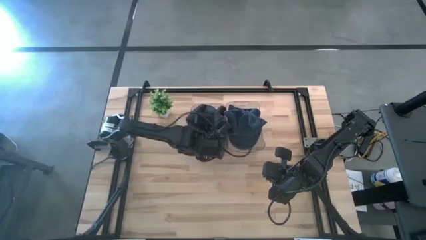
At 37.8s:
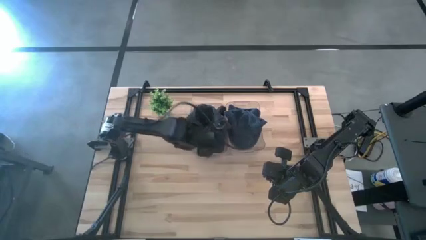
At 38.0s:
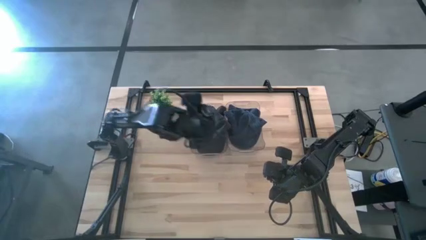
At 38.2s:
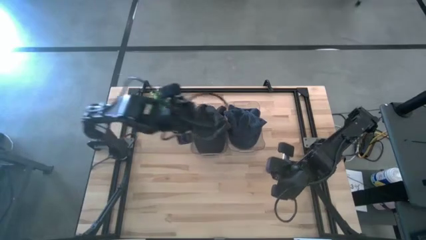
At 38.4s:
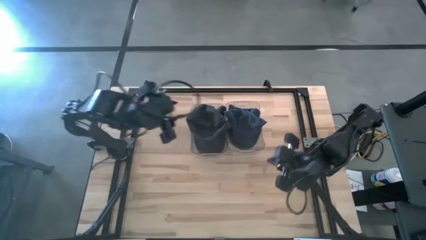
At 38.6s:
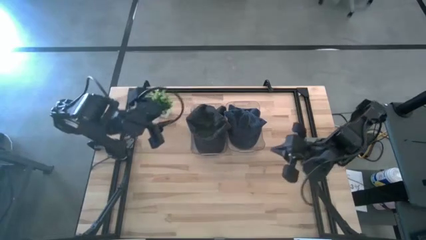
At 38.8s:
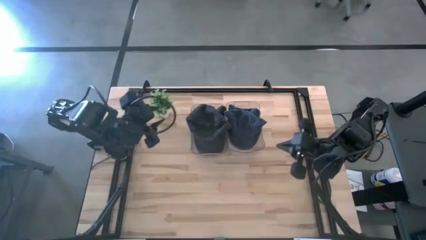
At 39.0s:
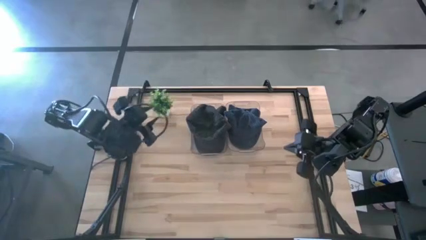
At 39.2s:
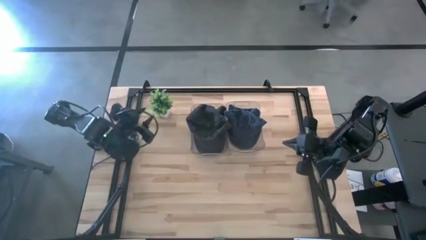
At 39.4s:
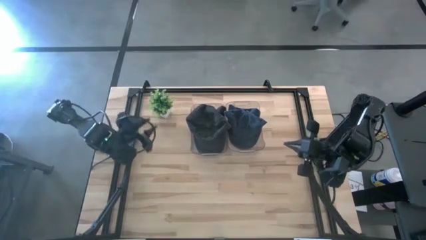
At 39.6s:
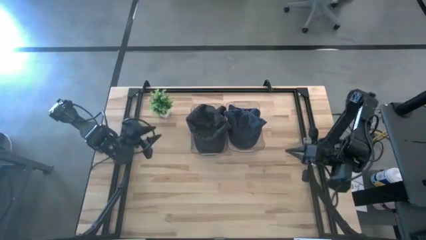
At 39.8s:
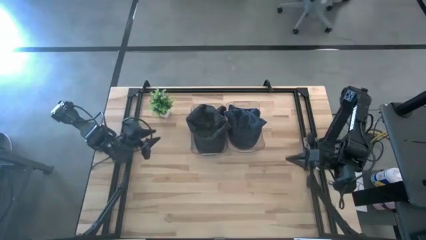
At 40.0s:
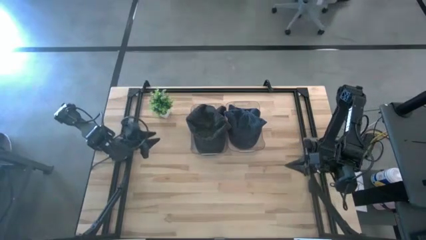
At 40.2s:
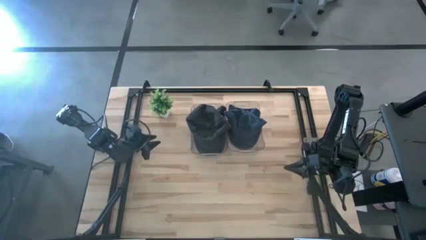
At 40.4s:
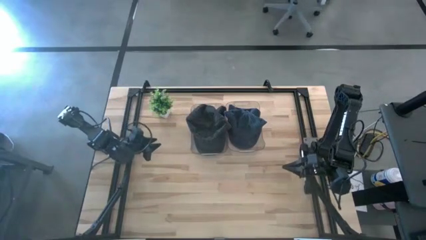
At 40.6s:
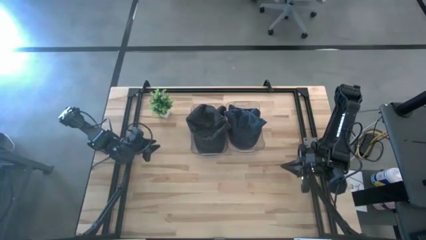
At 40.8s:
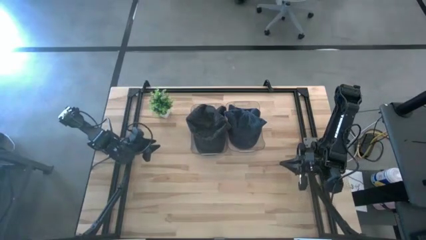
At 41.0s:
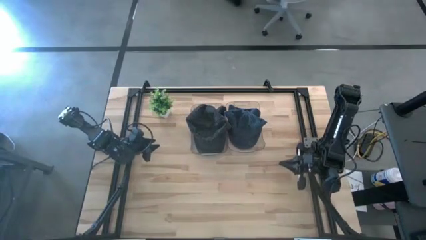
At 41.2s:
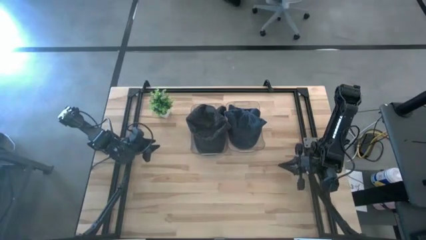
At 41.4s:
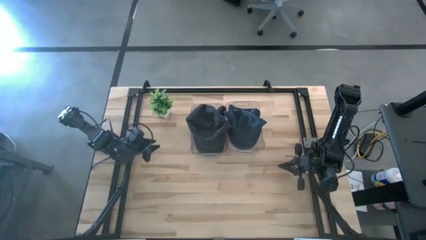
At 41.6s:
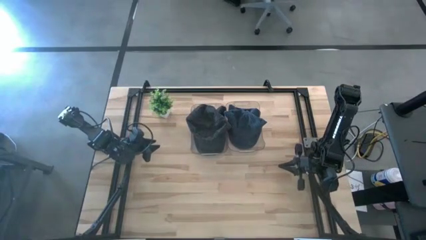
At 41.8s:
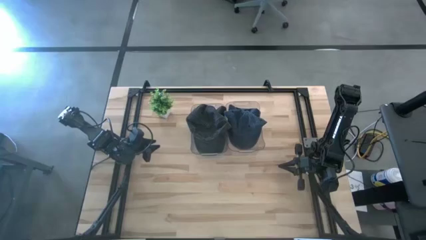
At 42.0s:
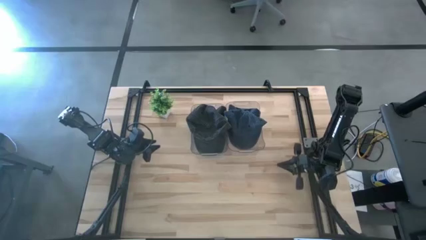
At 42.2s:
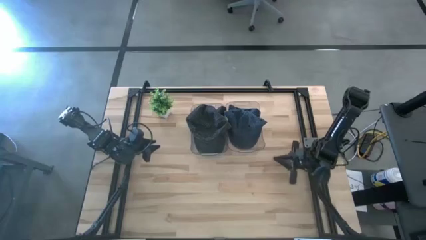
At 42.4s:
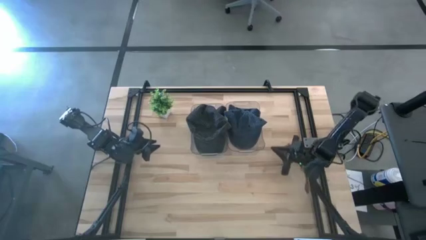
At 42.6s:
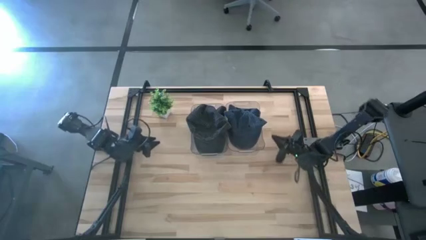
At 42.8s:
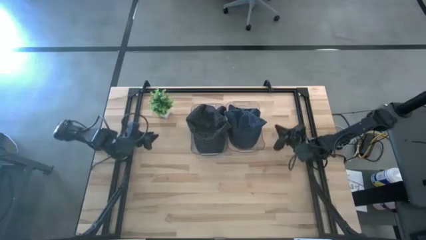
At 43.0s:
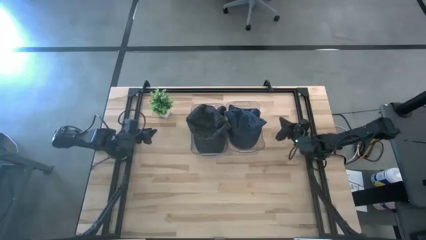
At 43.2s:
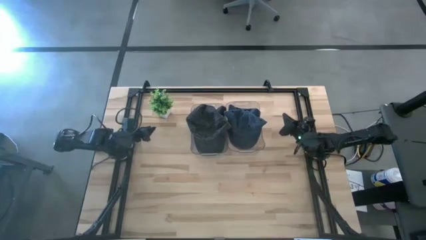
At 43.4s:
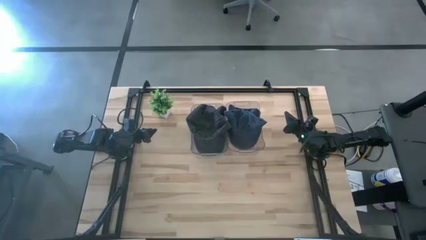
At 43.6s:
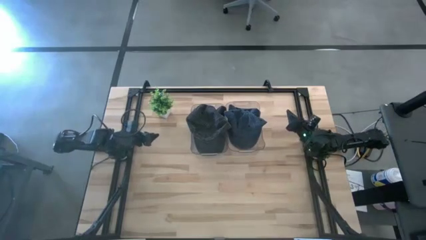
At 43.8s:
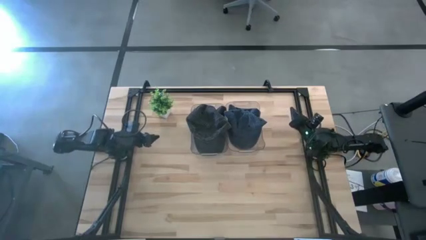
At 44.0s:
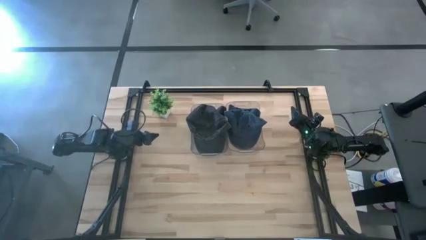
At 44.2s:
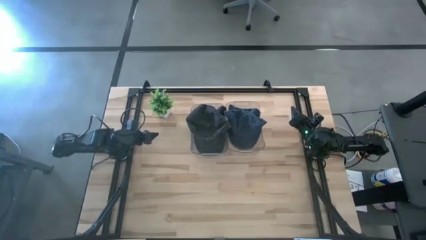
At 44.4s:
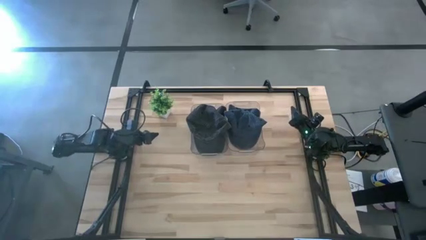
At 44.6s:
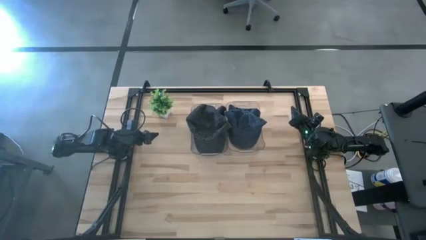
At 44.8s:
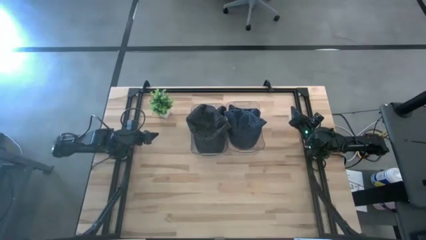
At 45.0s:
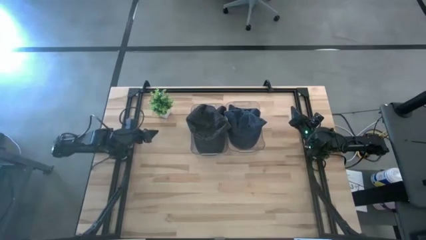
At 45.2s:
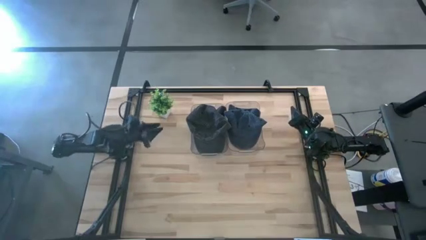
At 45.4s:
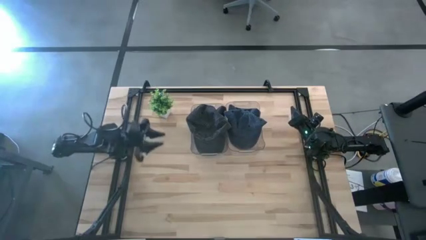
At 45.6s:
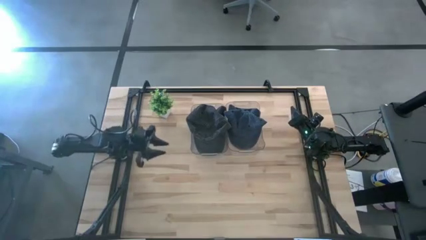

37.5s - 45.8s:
Task: Pick & Place hat
Return to Home Position

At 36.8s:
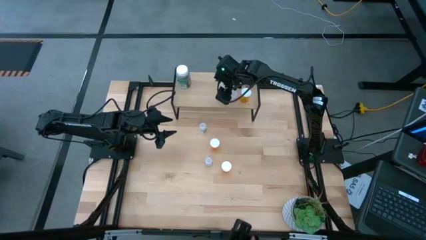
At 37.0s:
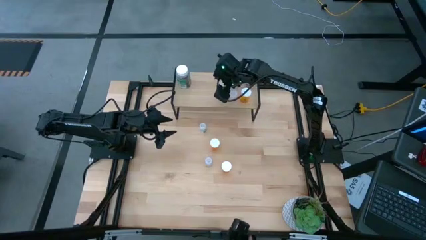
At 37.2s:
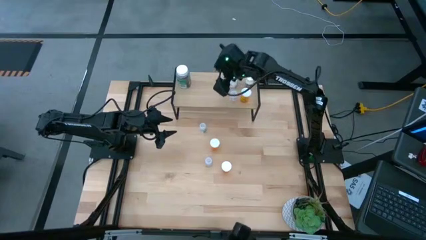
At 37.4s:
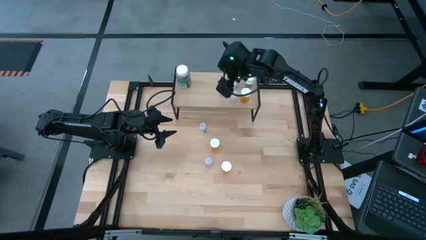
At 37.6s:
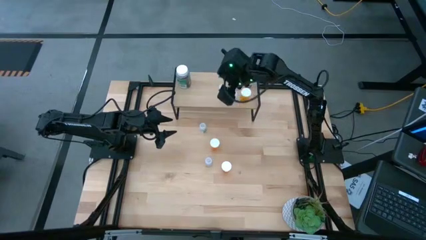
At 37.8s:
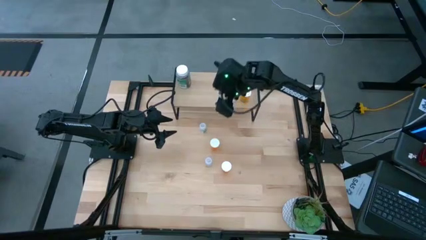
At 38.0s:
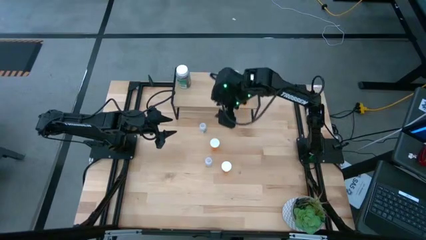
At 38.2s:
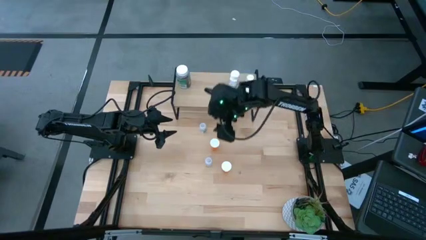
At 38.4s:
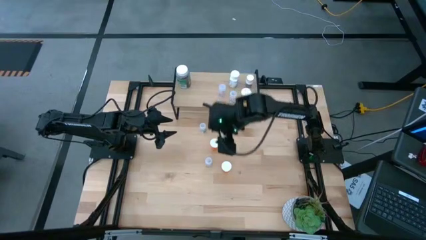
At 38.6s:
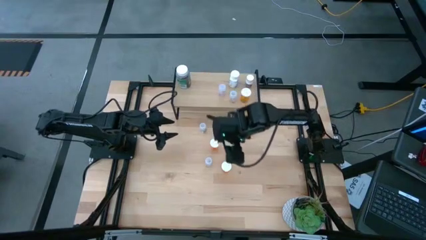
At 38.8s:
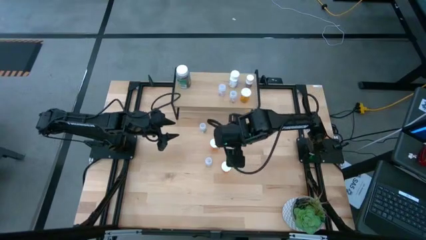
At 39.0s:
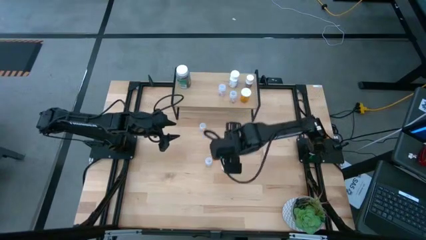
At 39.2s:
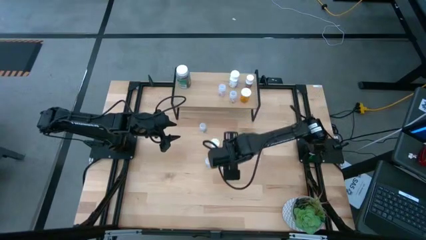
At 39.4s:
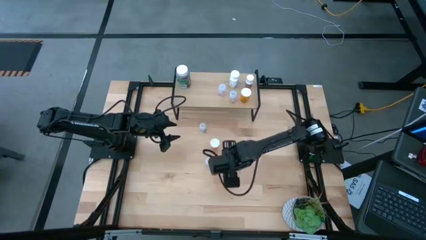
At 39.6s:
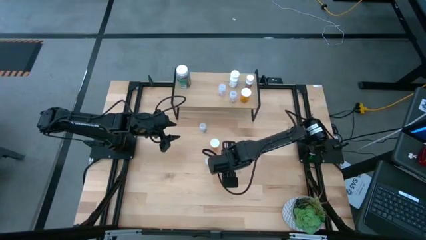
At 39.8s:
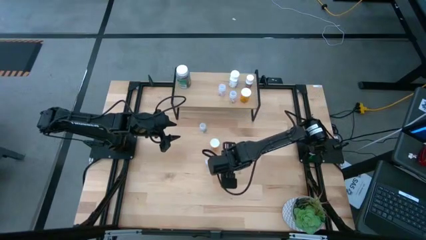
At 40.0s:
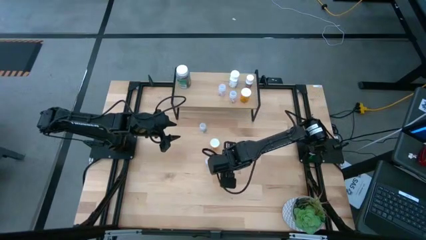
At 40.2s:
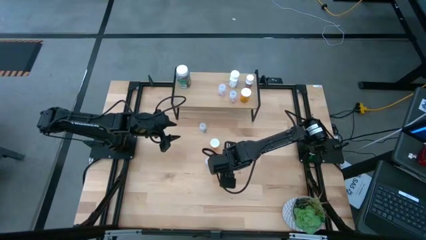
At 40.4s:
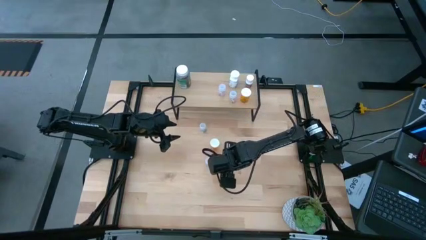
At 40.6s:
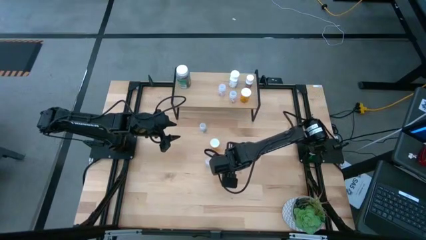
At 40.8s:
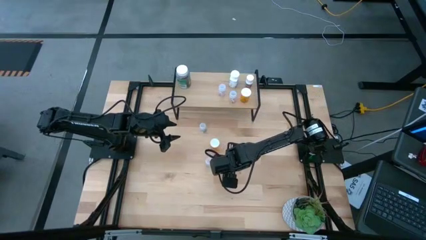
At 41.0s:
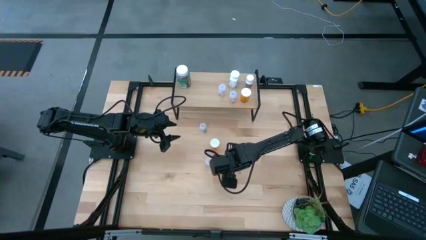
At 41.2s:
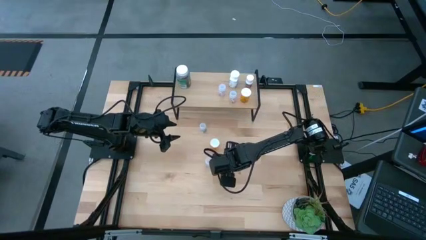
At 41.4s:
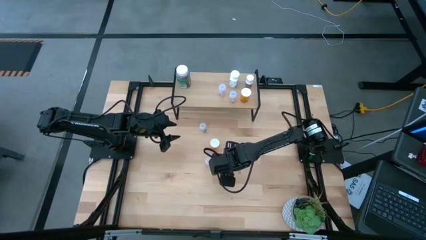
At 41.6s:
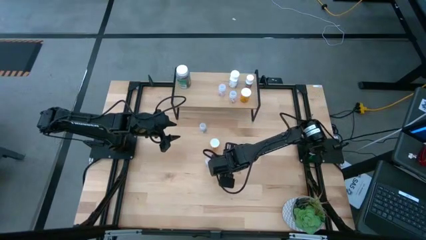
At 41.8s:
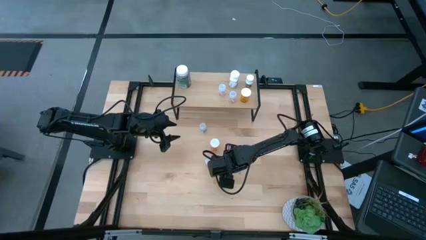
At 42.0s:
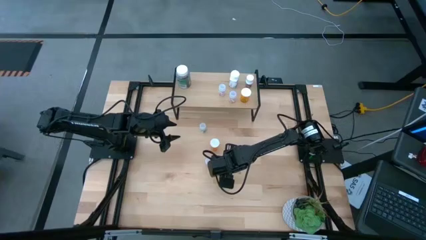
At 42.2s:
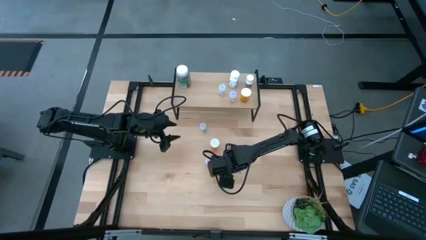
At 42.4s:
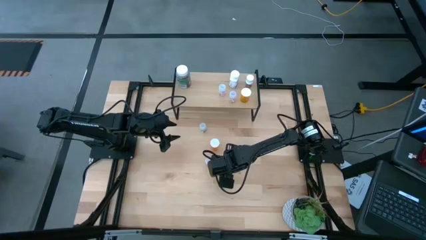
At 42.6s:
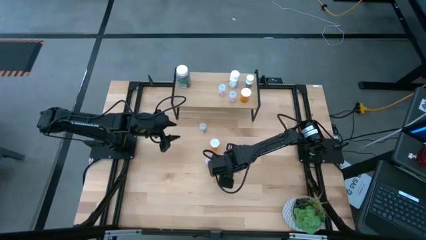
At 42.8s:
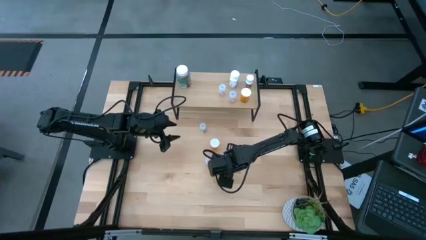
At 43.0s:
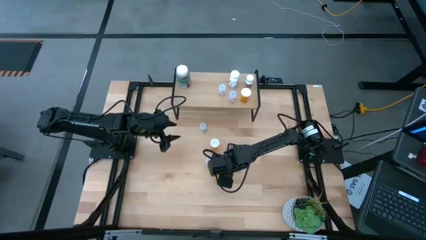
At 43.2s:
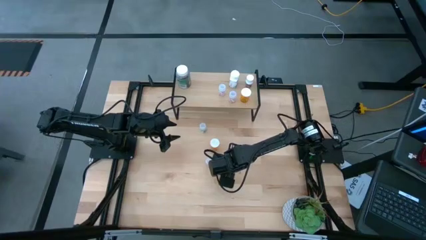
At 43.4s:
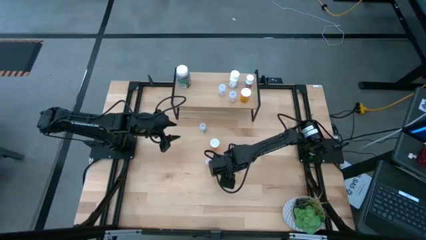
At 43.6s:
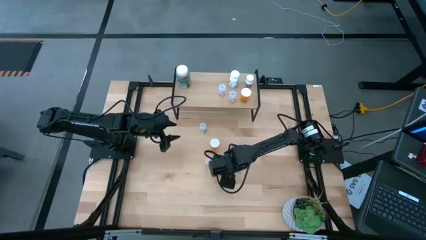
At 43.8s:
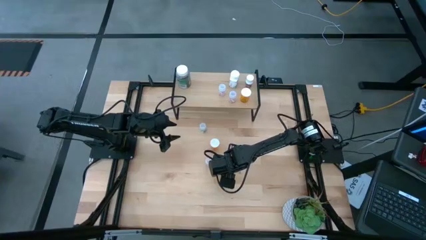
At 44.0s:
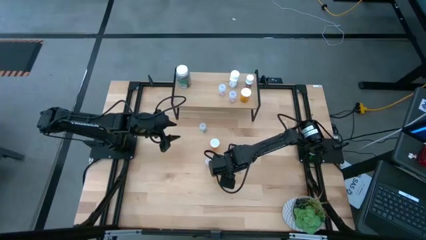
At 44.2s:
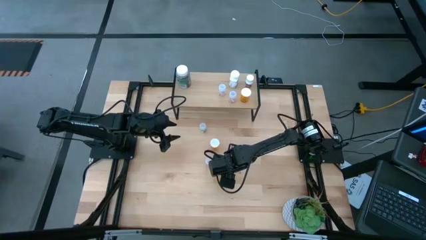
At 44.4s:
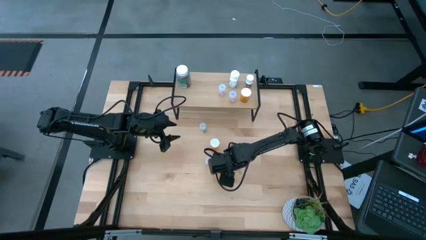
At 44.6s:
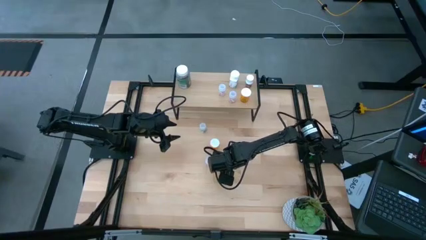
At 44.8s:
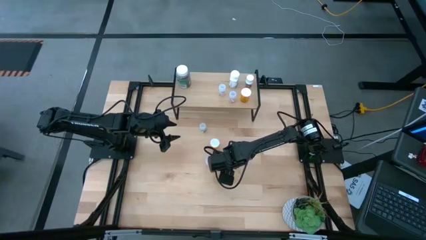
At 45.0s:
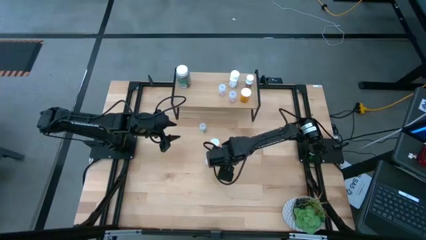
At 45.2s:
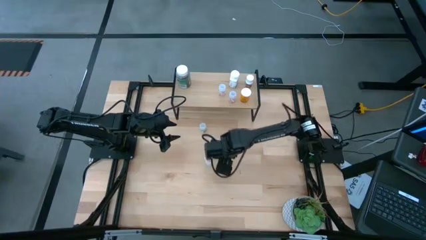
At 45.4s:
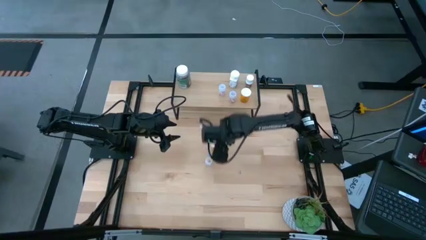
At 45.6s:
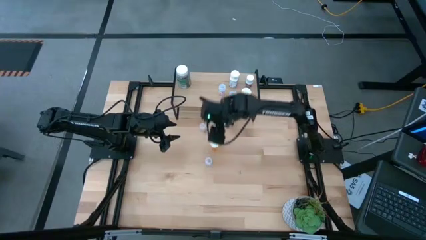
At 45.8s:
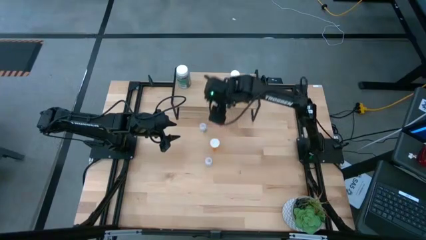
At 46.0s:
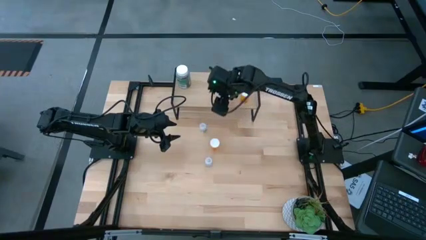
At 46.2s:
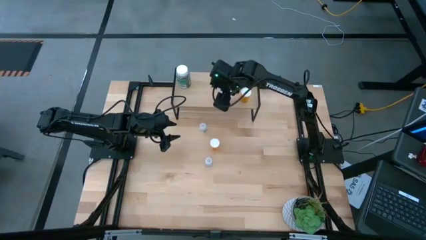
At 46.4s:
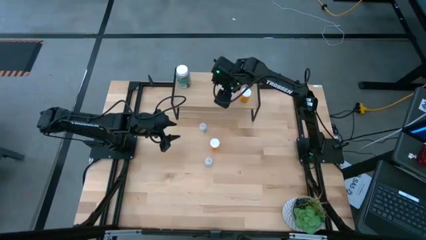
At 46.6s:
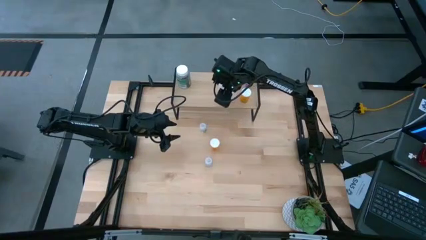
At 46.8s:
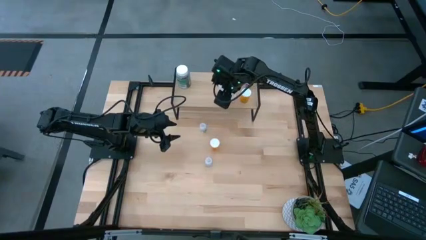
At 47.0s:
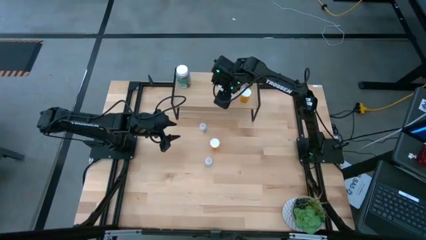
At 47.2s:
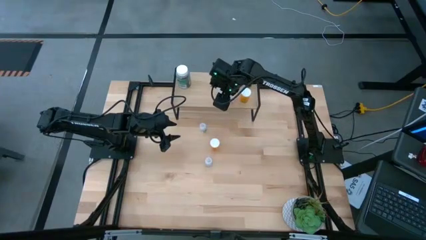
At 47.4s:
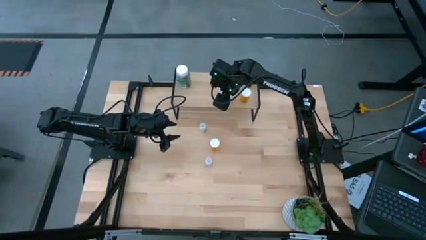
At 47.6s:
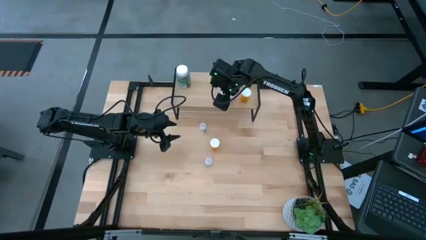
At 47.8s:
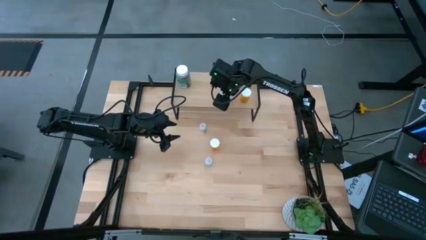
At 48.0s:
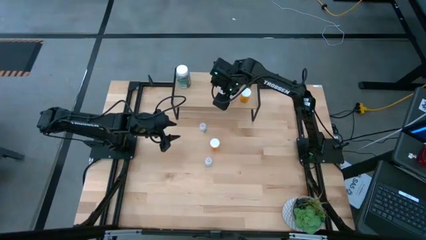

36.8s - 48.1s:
Task: Pick and place medicine bottles onto shelf by color
Put the orange pill bottle on the shelf
